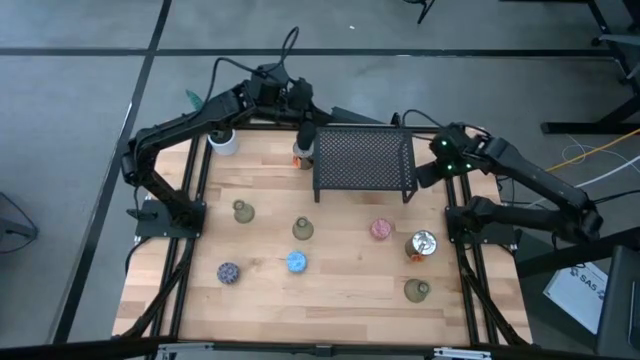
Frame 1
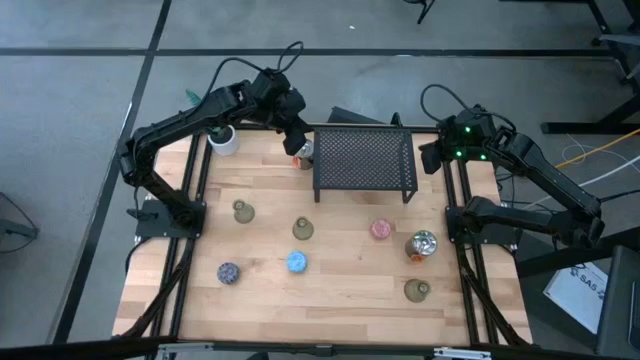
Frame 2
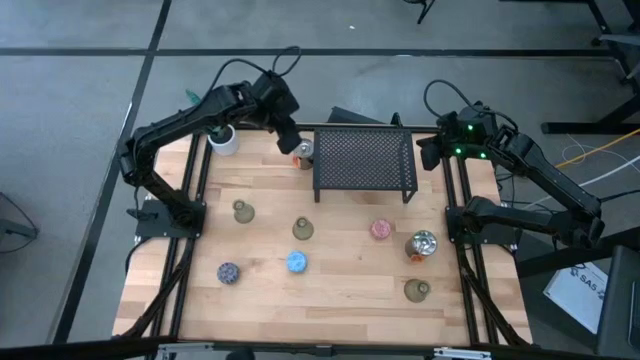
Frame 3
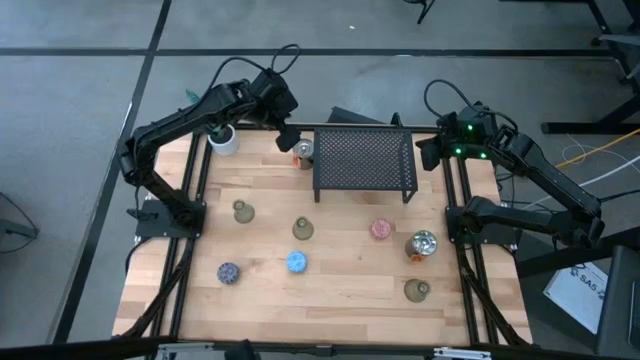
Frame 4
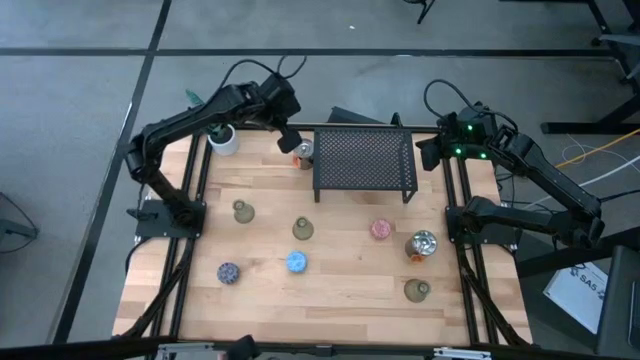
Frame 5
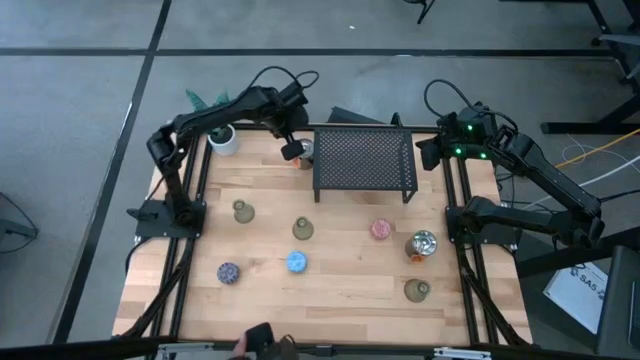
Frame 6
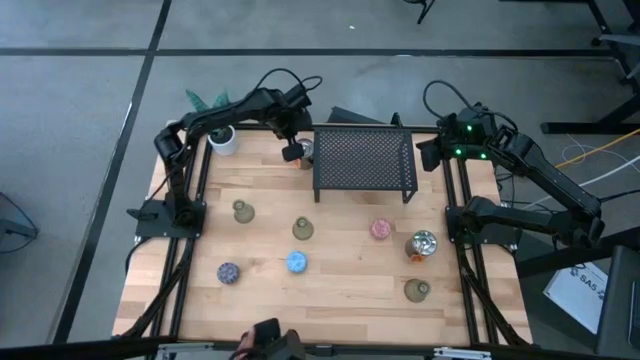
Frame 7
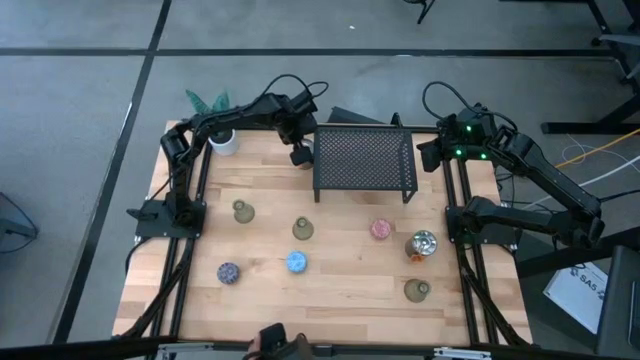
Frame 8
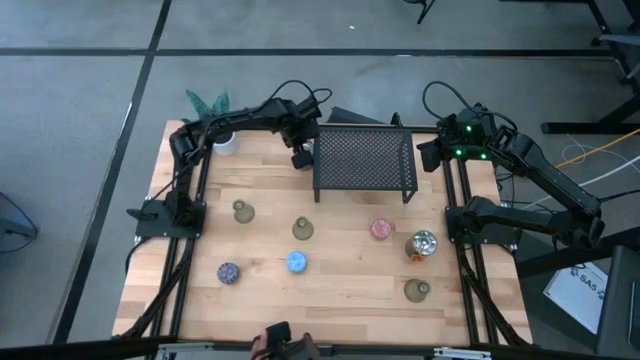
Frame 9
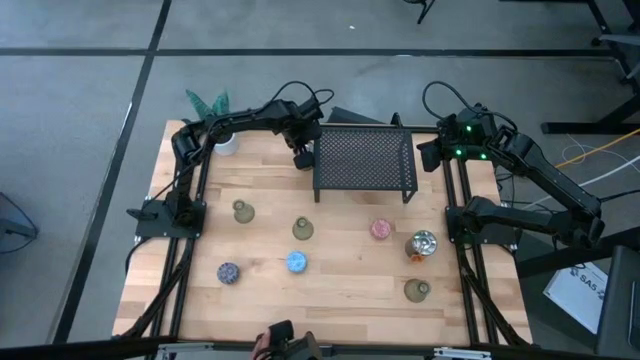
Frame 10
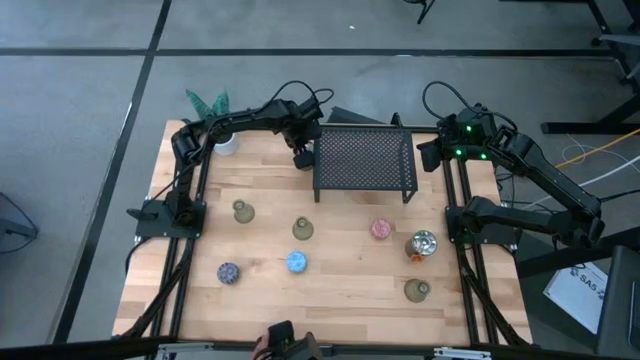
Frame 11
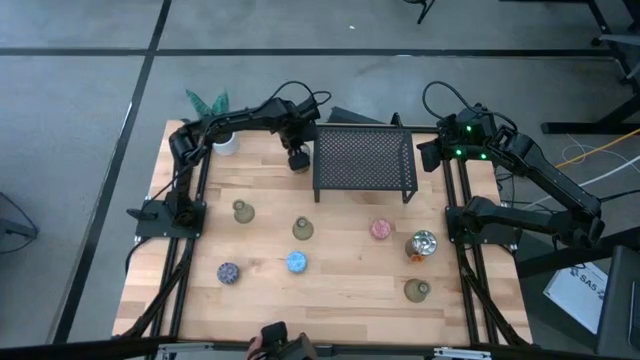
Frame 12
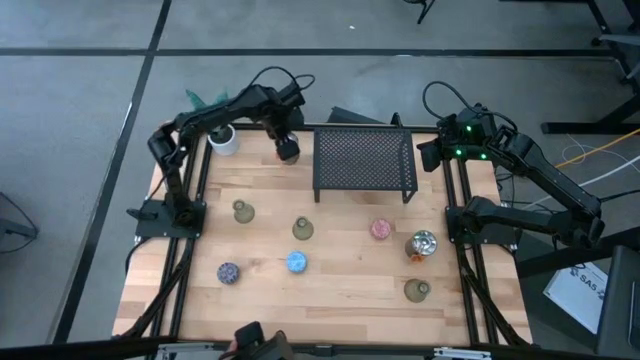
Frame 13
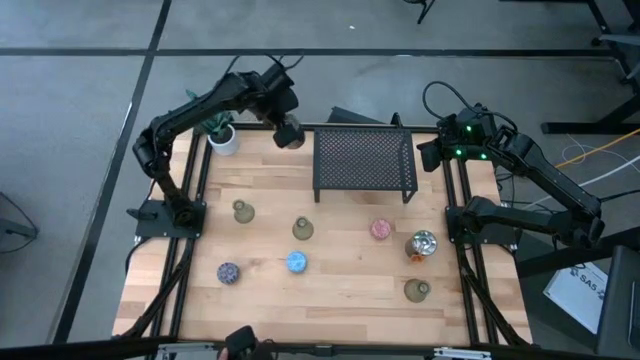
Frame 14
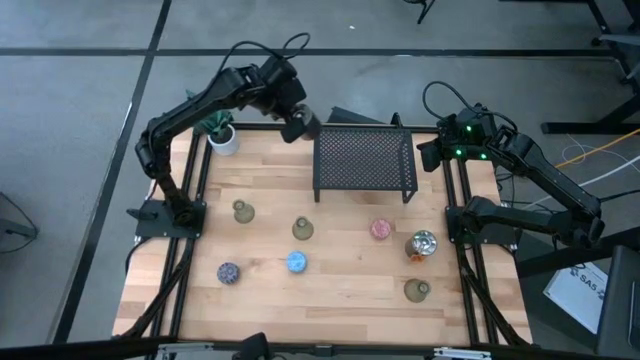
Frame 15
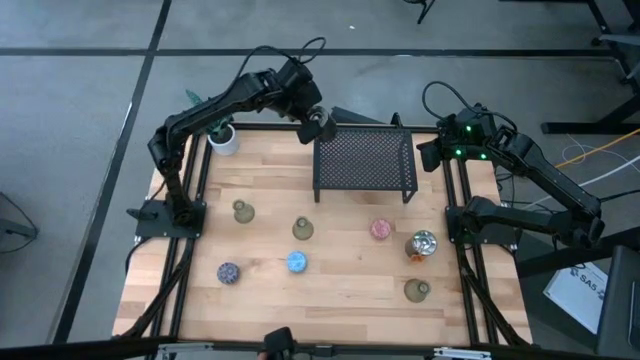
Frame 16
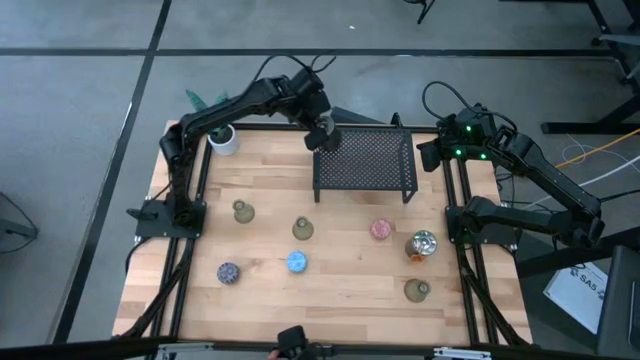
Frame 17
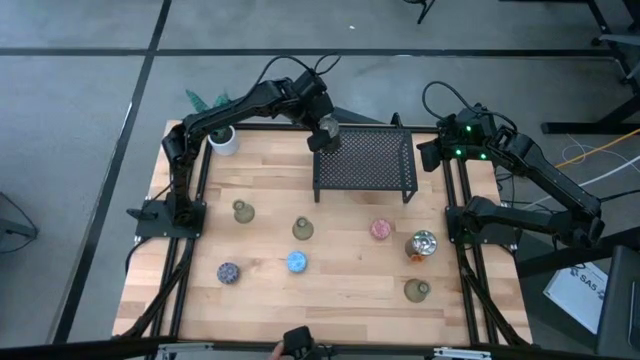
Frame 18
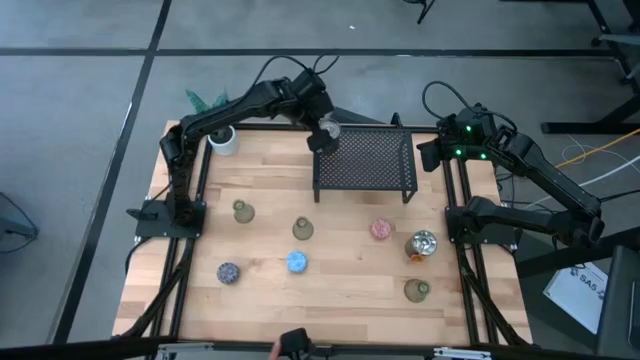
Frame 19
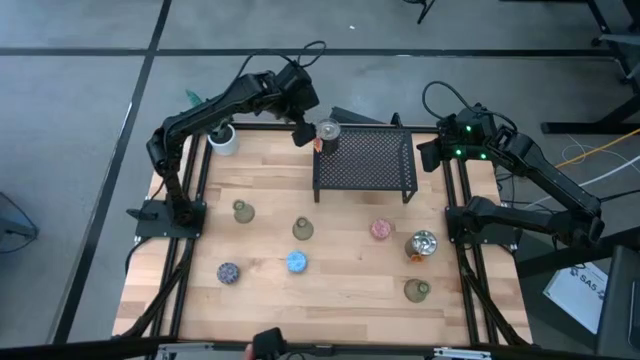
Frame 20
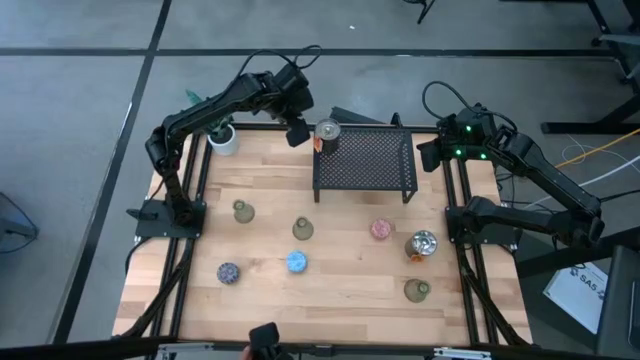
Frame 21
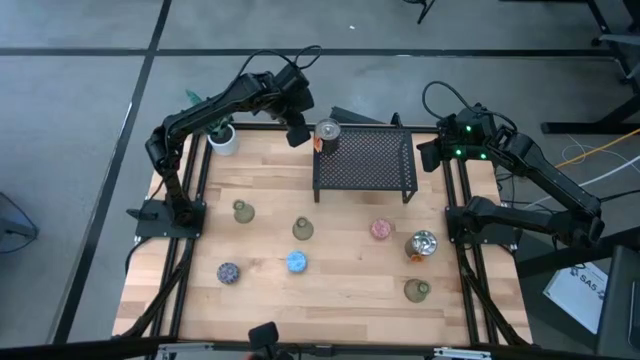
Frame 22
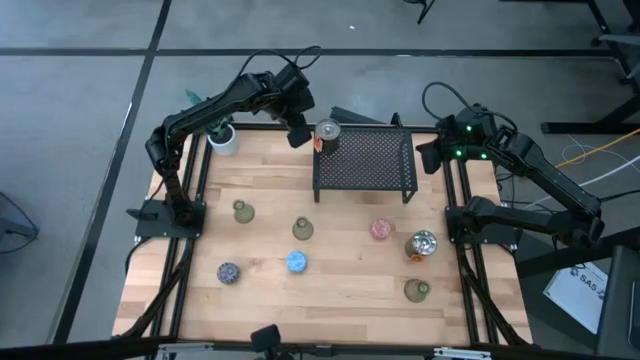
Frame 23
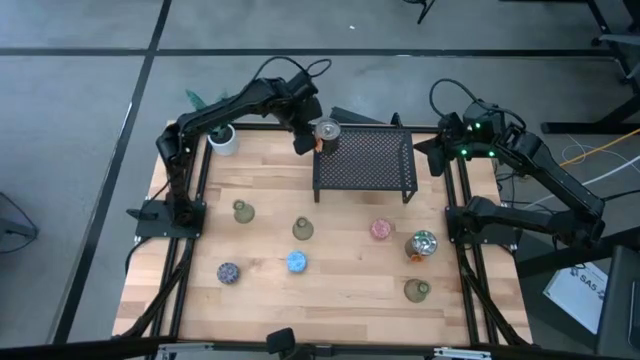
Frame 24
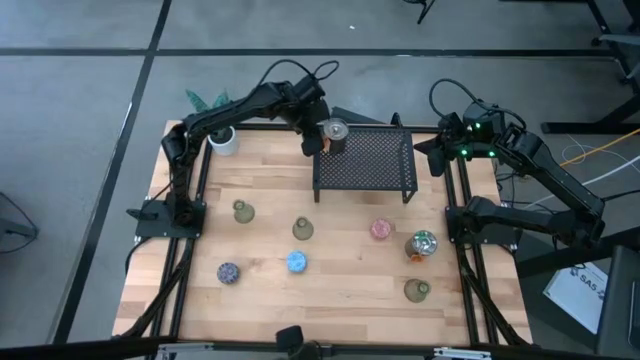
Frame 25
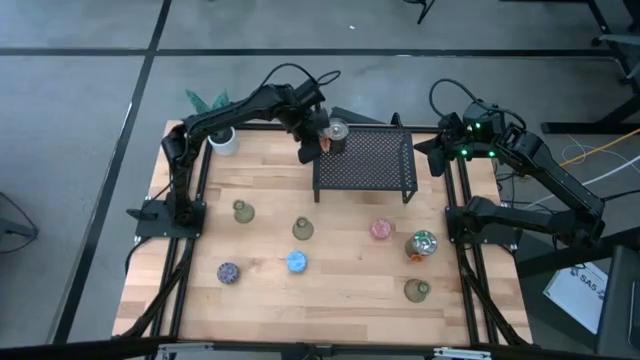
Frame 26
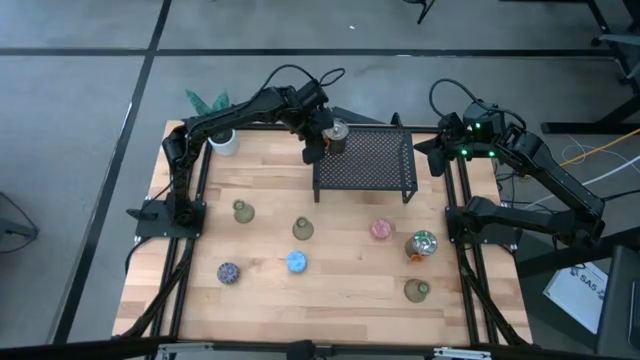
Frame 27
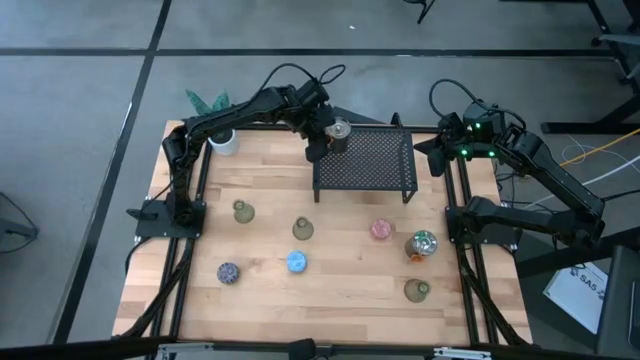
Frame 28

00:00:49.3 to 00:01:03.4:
Task: Pick & Place candle stick holders
Put the top silver scented candle on the shelf

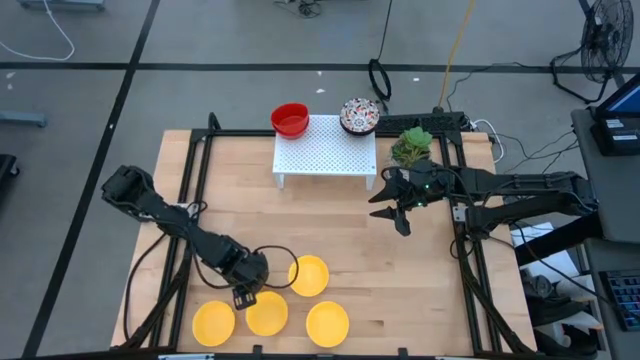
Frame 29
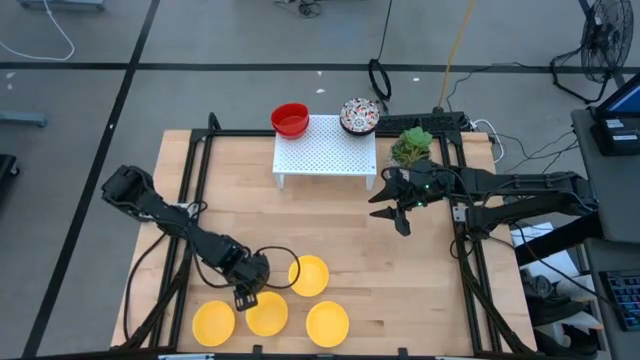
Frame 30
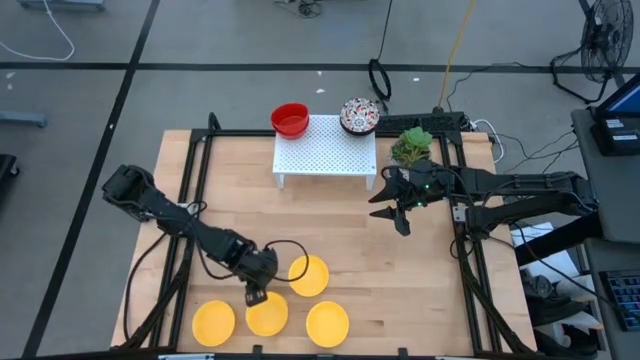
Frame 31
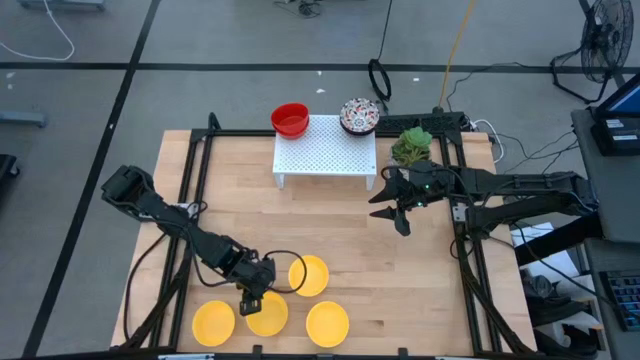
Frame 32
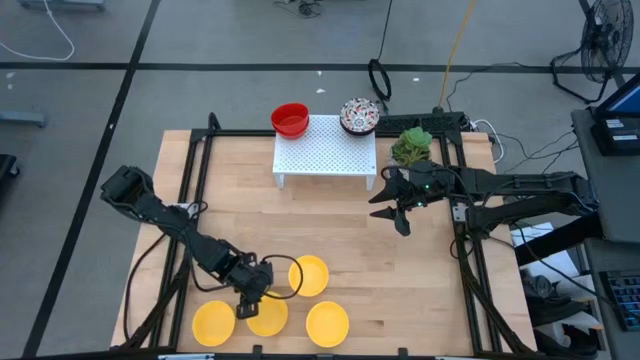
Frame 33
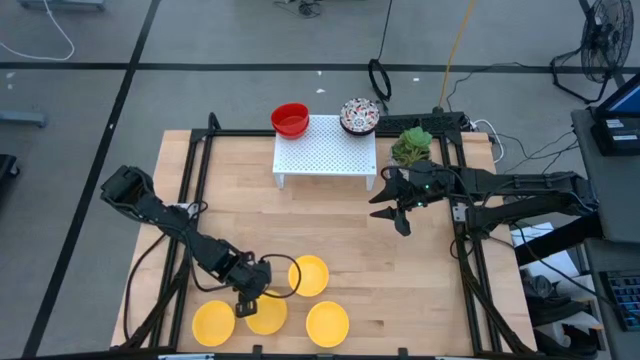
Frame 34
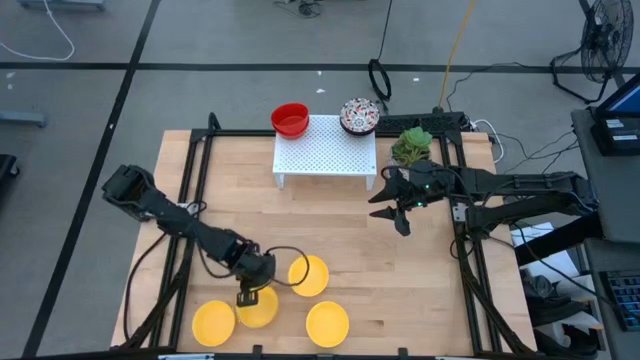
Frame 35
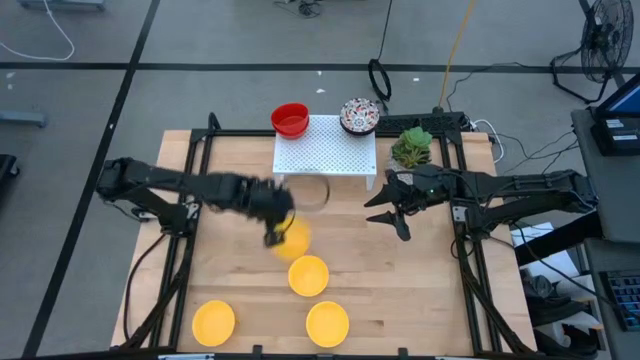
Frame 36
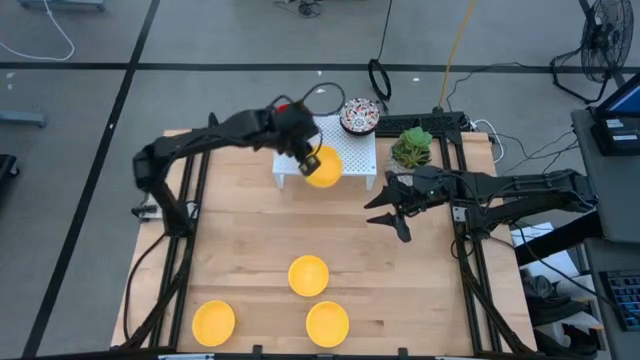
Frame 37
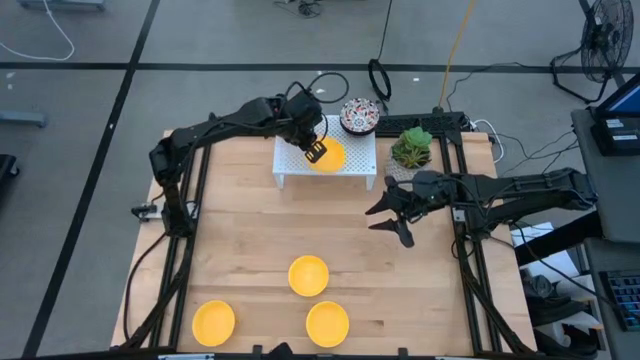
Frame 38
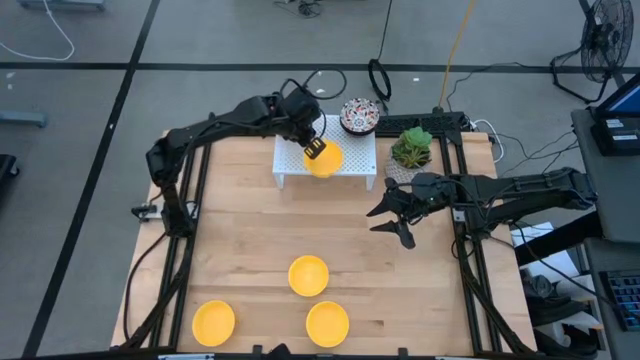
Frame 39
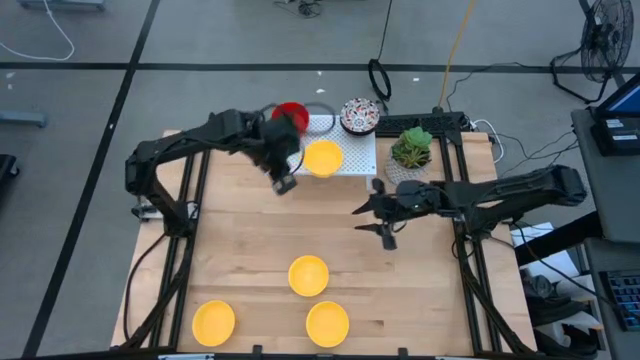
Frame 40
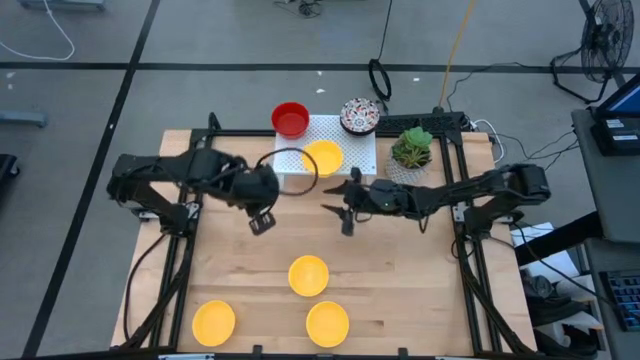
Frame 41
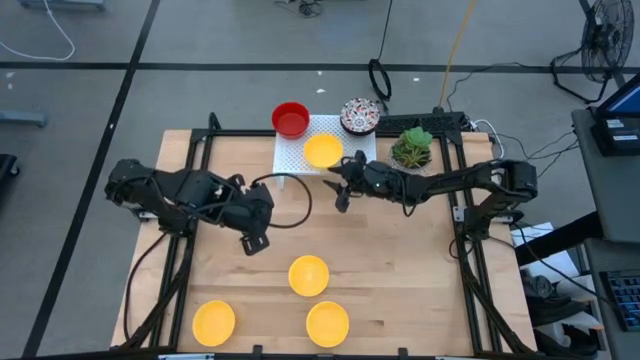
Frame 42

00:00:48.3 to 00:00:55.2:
Task: Pick & Place Mini bowls
Put the yellow bowl on the shelf
